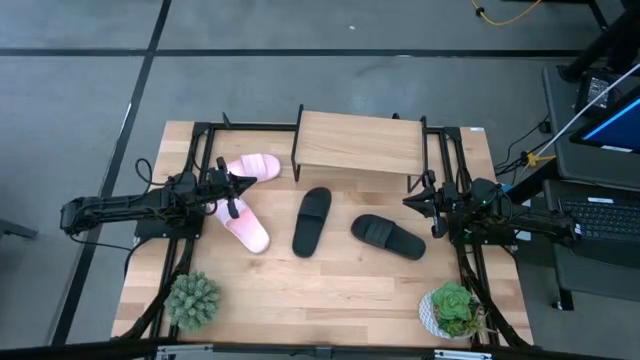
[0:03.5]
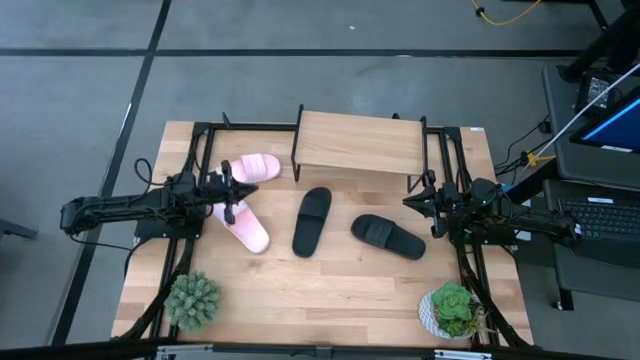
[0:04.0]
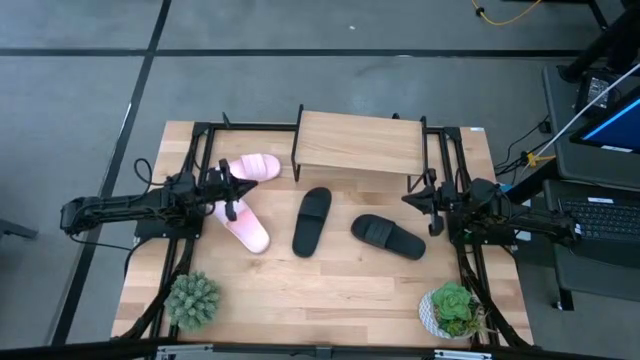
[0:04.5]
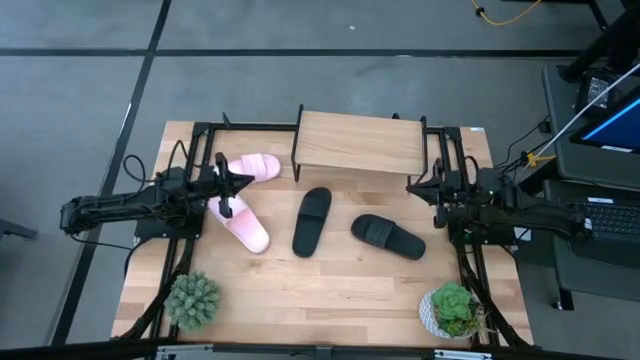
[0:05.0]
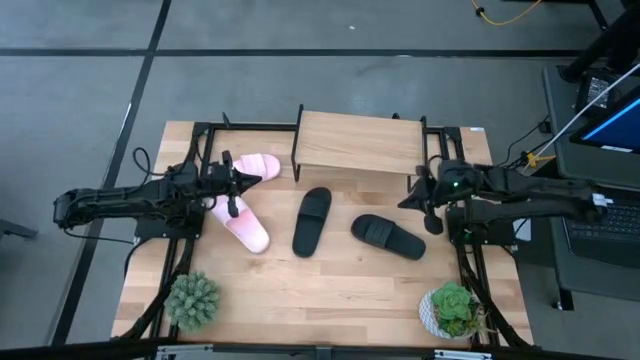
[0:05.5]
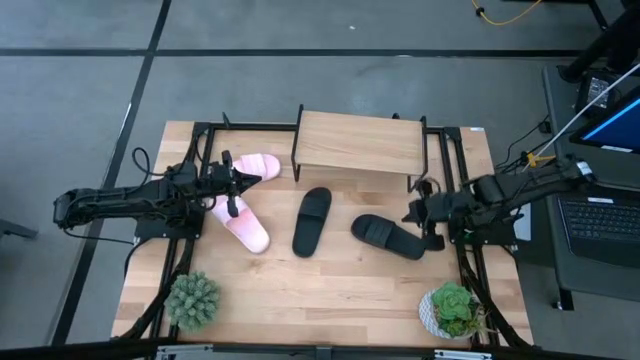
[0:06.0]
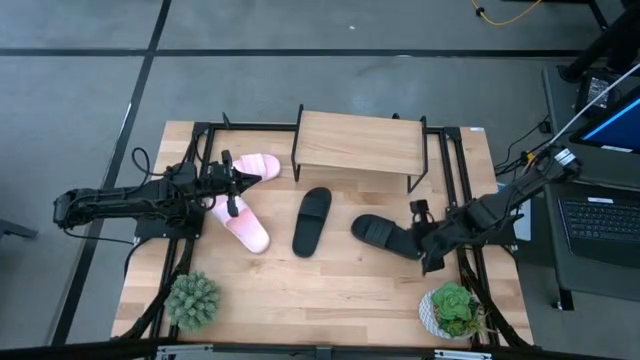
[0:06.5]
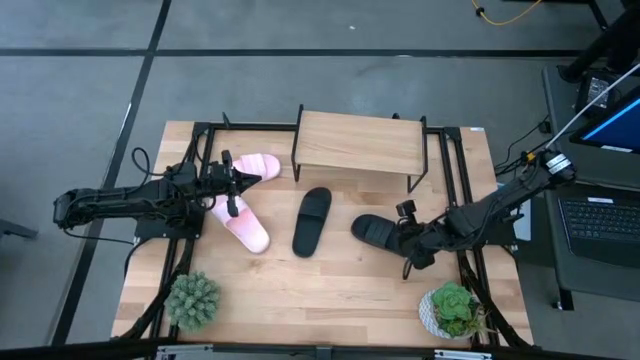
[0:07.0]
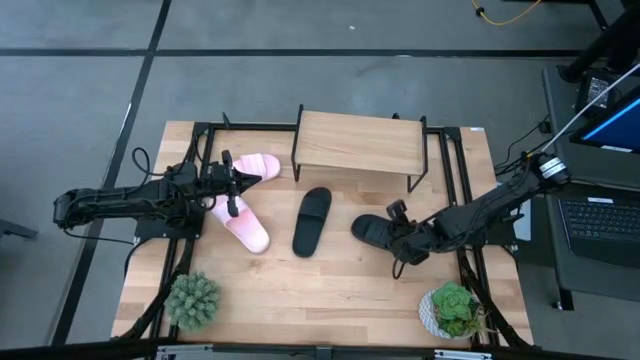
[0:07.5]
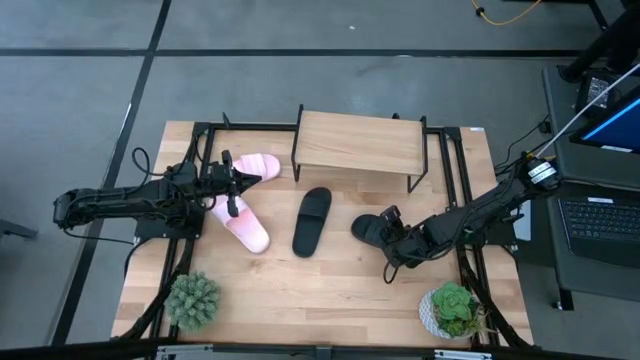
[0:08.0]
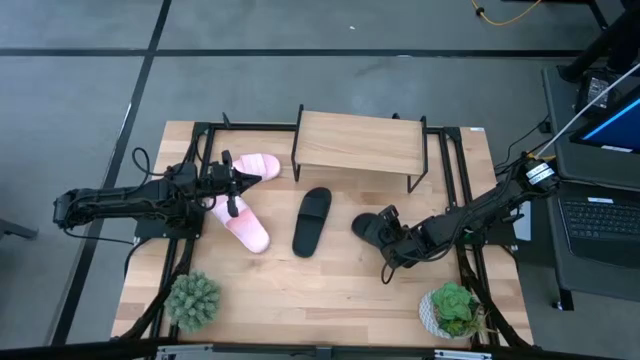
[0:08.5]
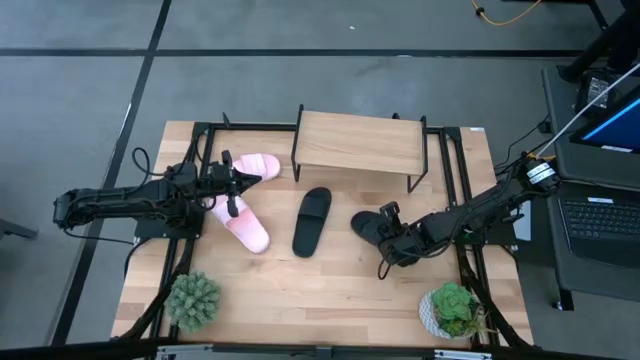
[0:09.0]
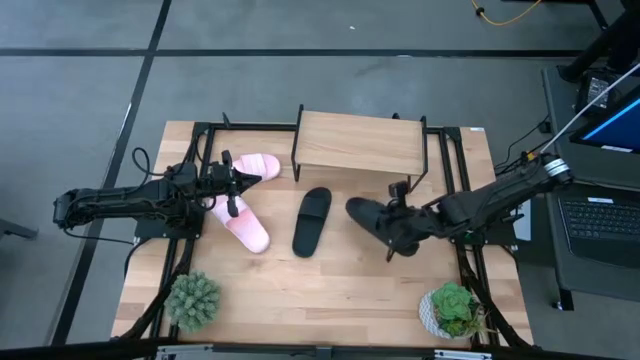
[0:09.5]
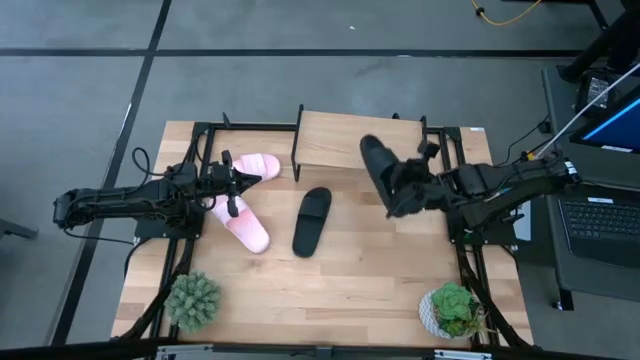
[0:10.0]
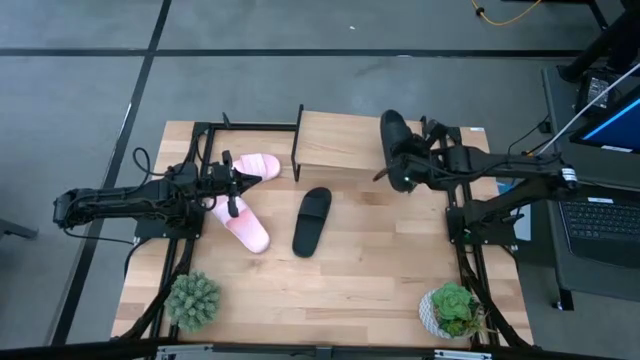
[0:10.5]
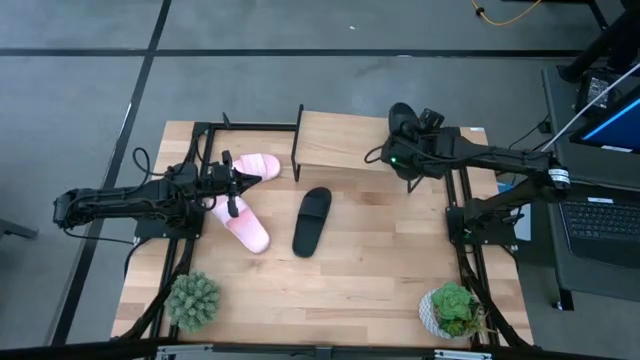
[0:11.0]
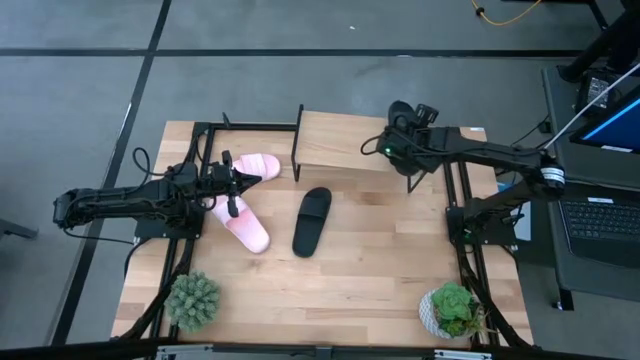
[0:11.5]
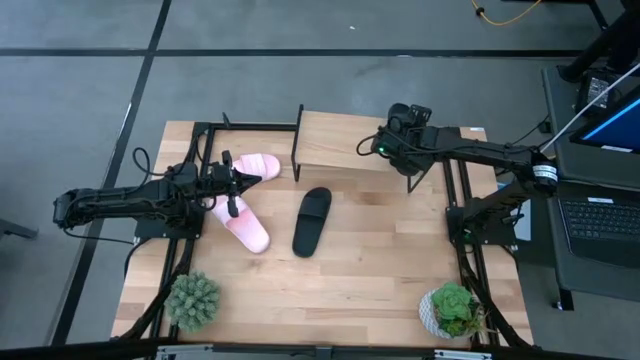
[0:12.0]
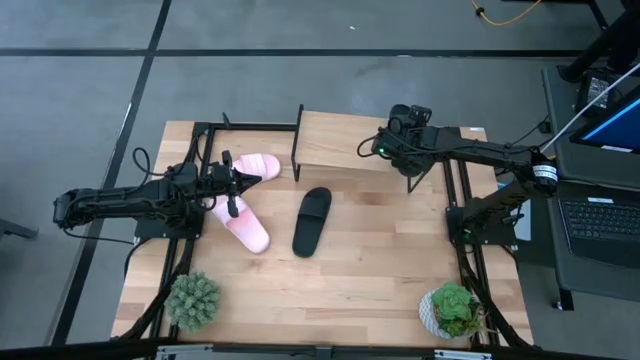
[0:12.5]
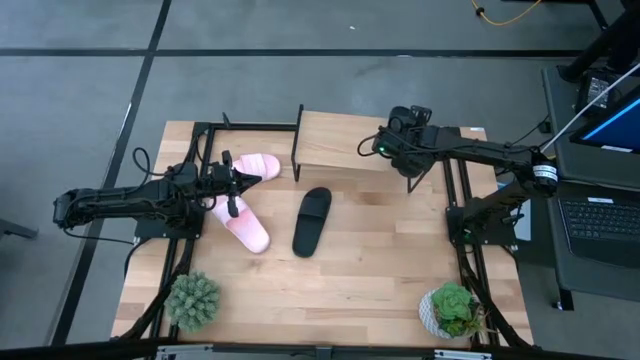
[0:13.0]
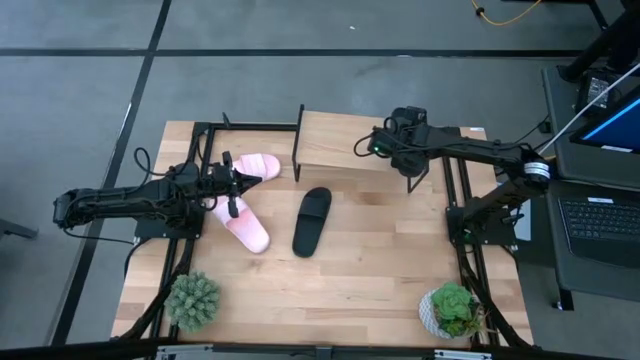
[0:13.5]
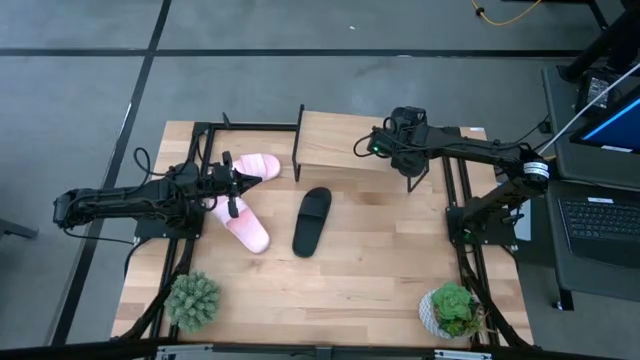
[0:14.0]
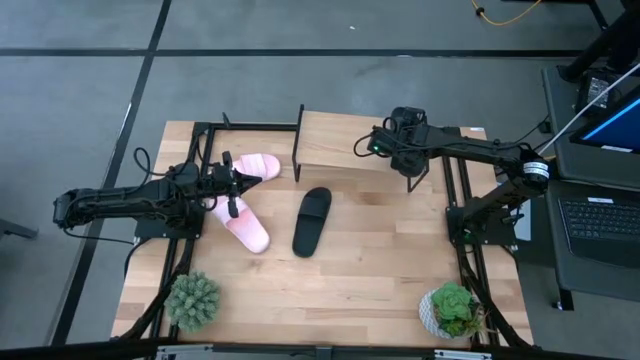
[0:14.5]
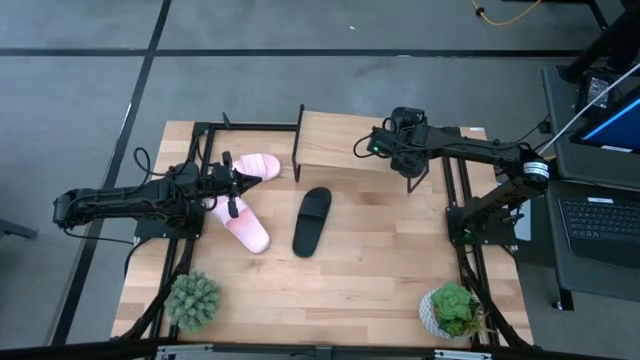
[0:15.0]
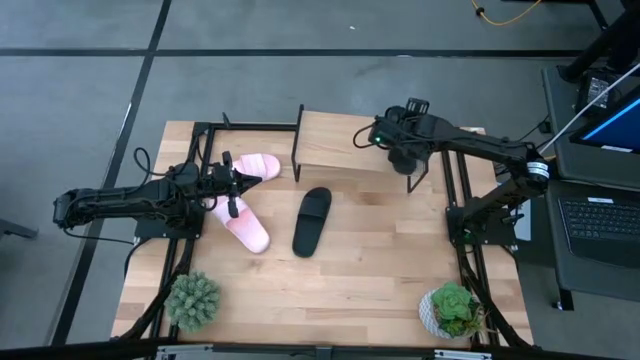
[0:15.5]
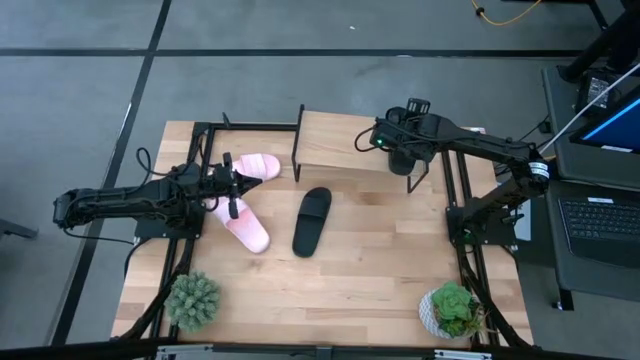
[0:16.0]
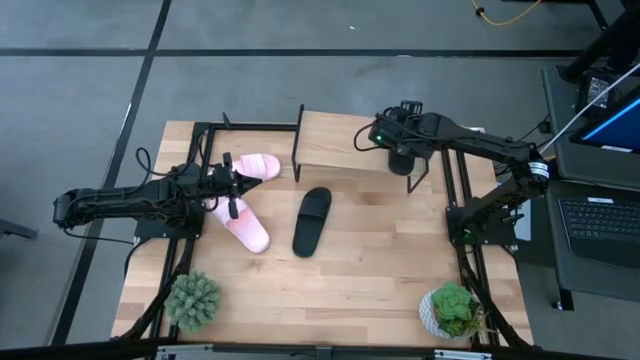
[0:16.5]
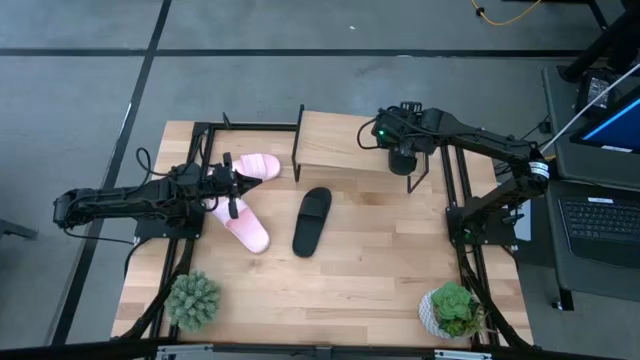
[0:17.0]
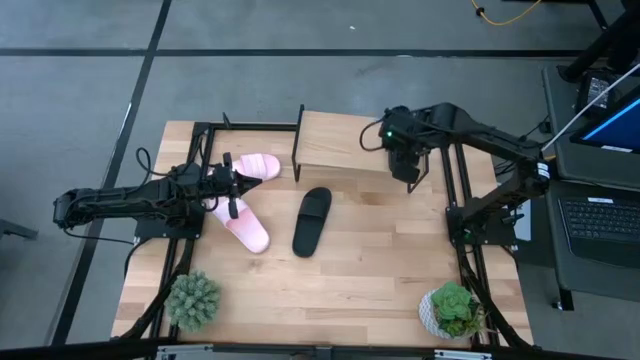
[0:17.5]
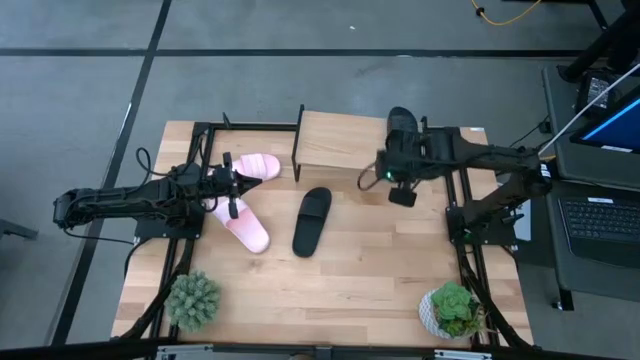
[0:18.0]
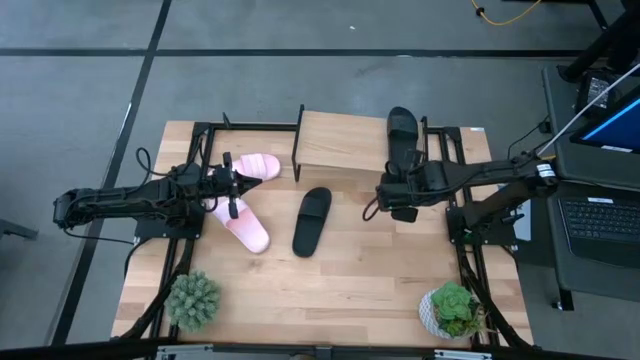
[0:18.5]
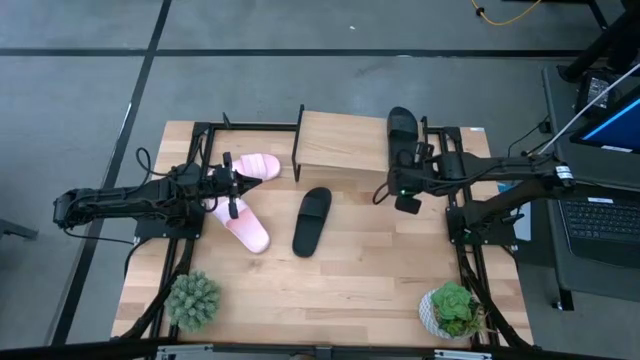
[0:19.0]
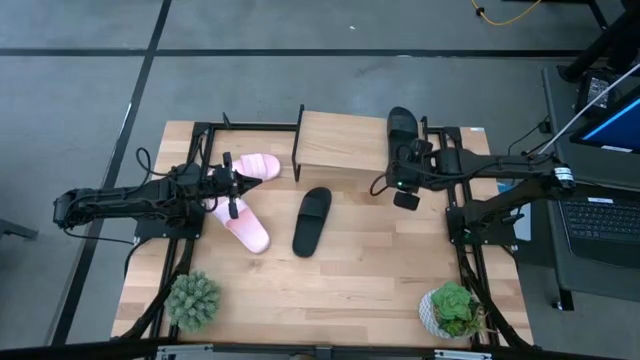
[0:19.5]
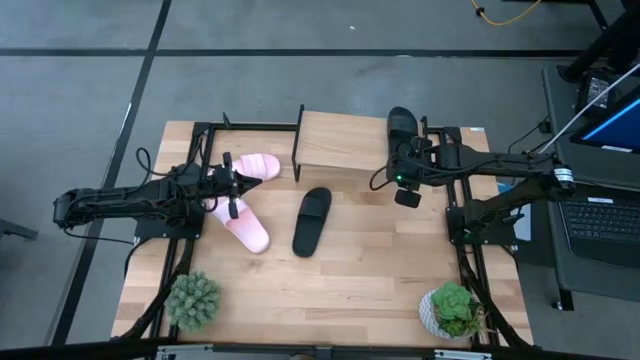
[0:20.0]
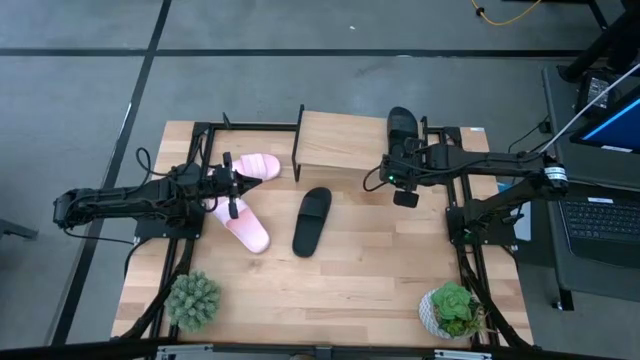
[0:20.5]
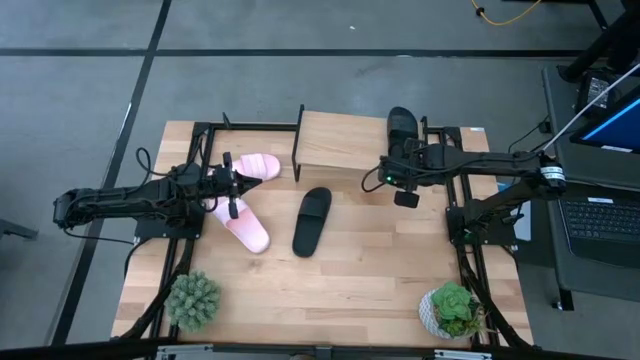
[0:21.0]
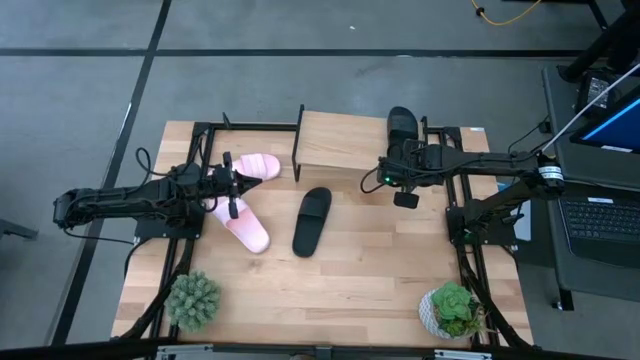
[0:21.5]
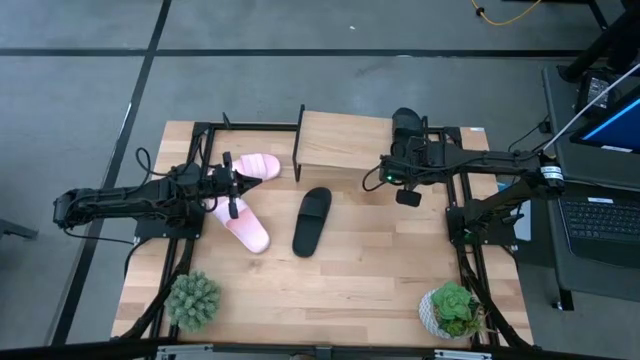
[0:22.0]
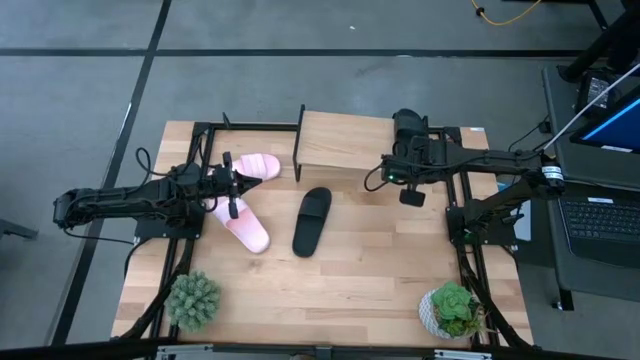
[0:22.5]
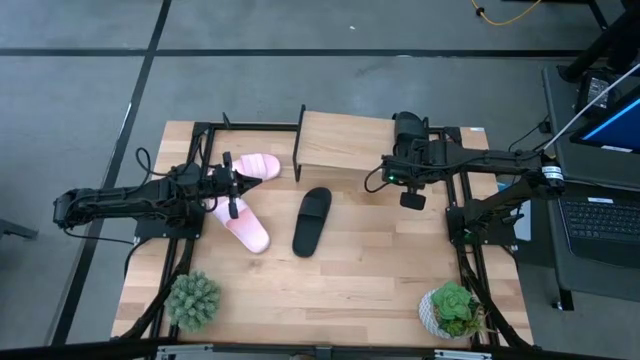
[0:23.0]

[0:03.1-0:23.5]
Task: Pick and place slides into the shelf
Put the right black slides on the shelf
